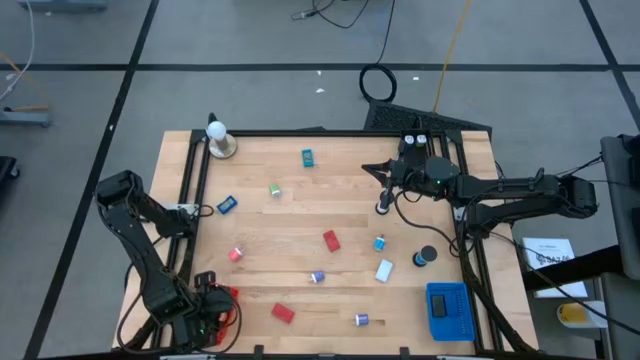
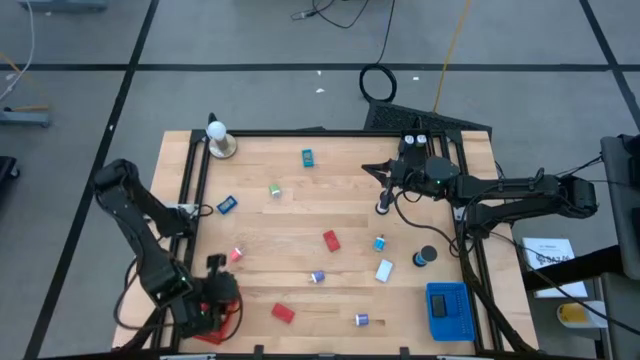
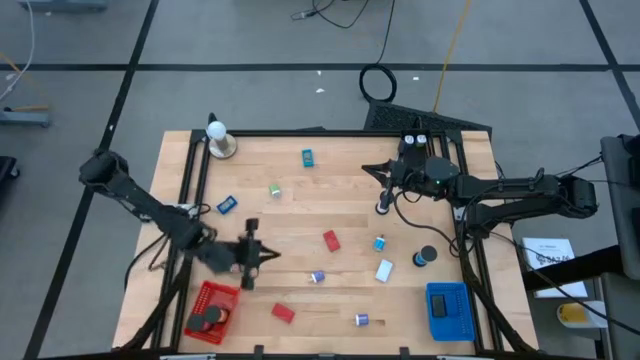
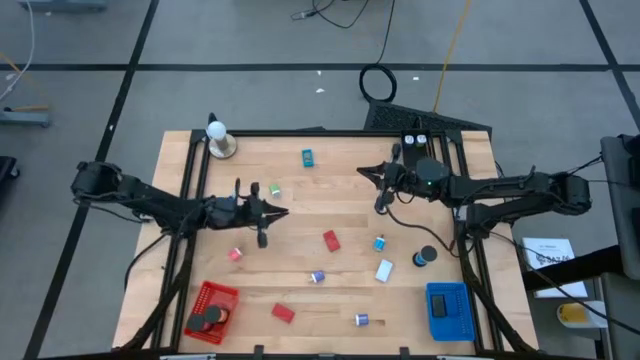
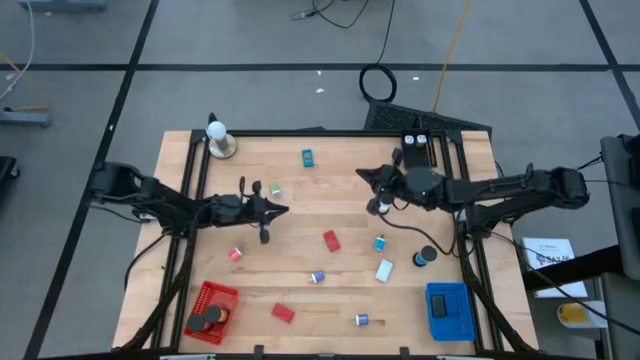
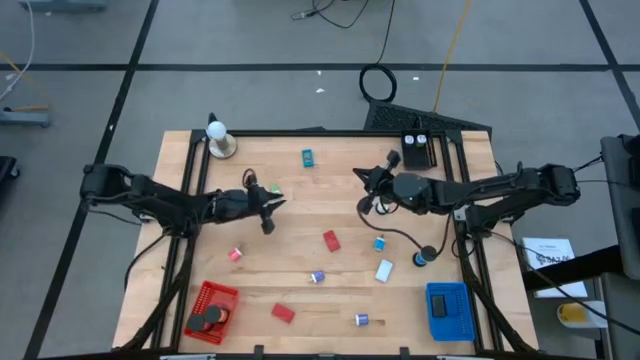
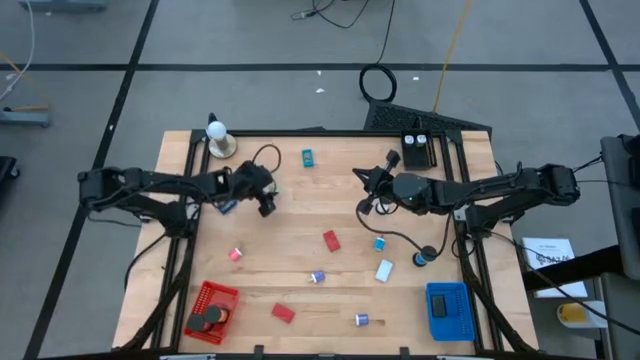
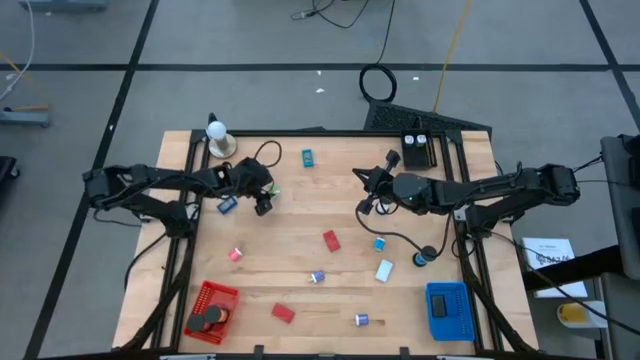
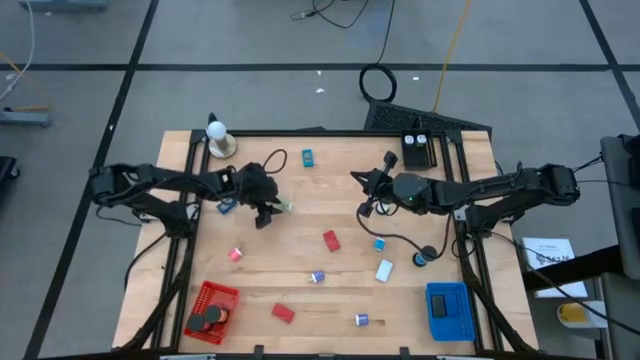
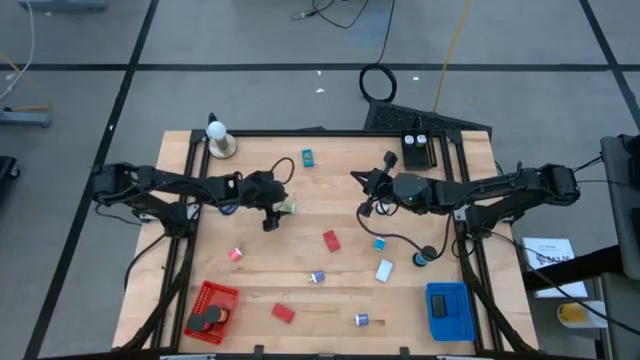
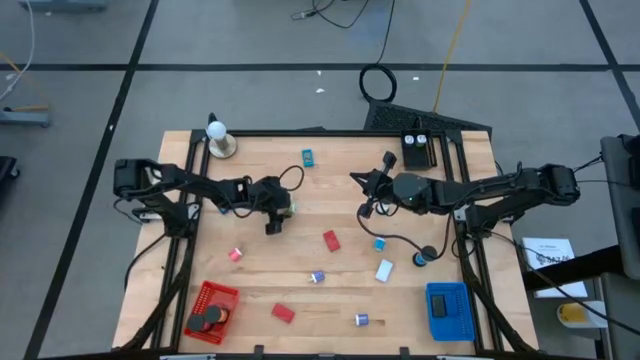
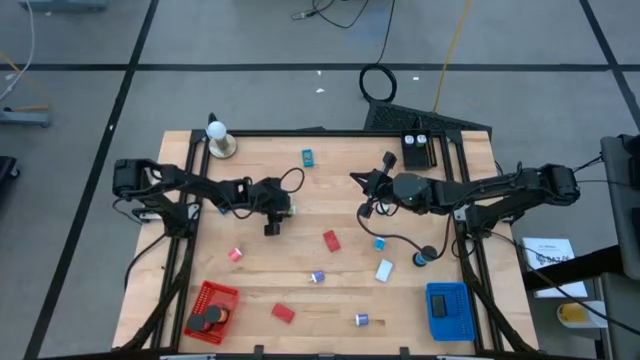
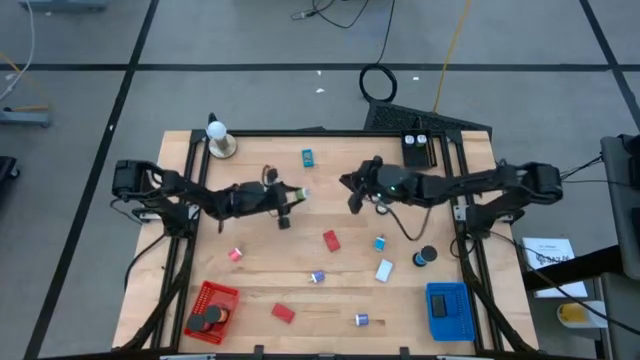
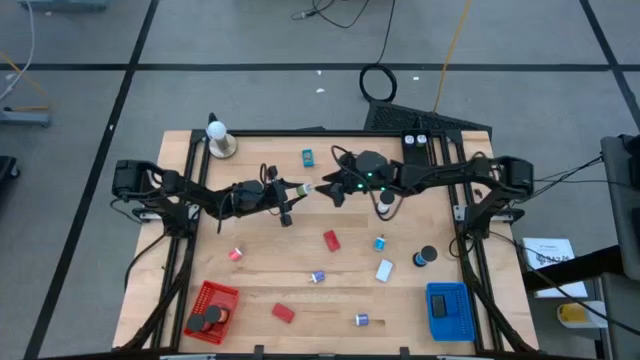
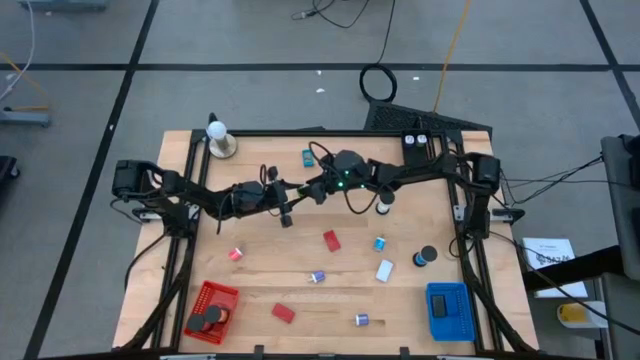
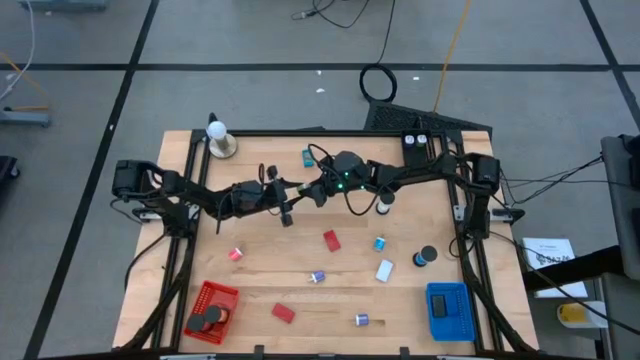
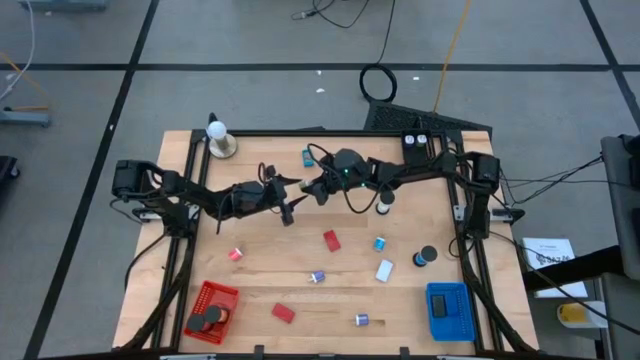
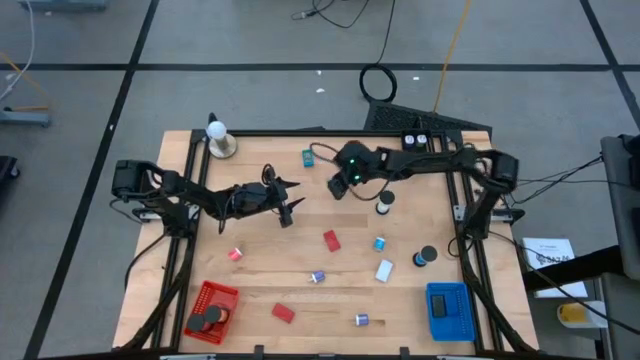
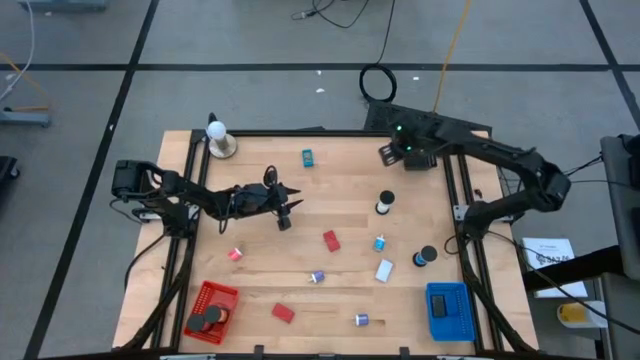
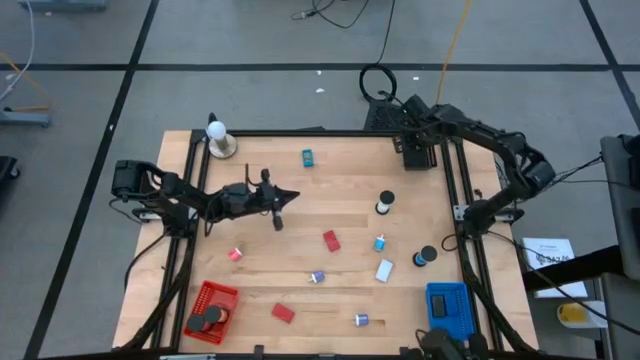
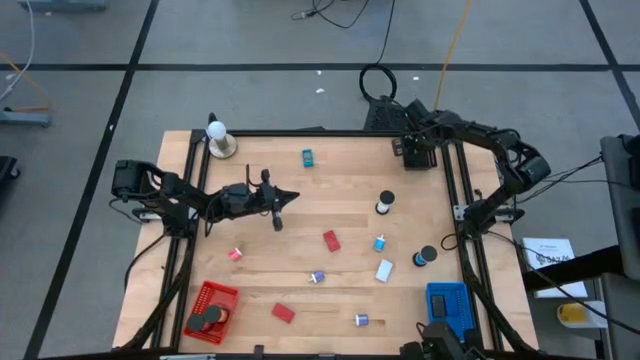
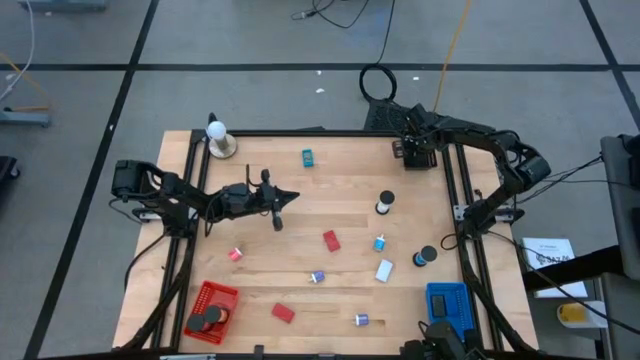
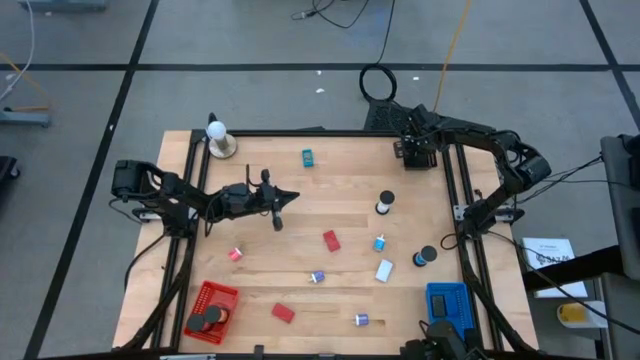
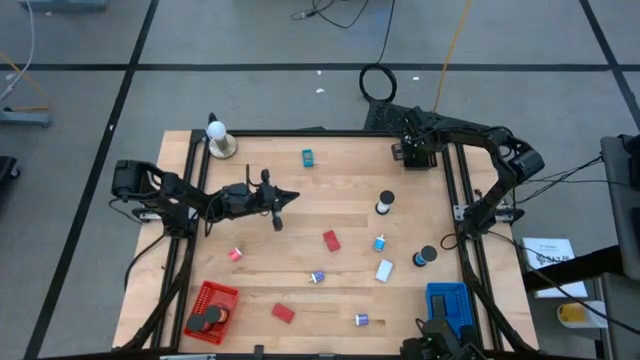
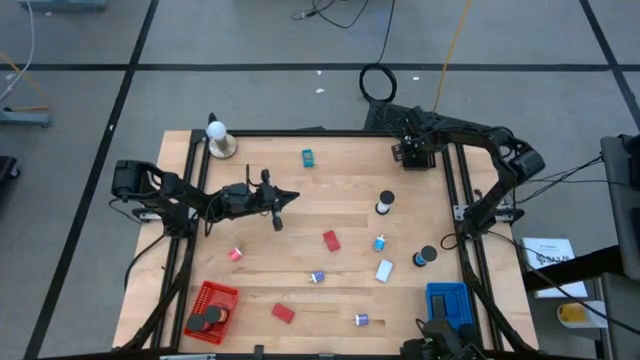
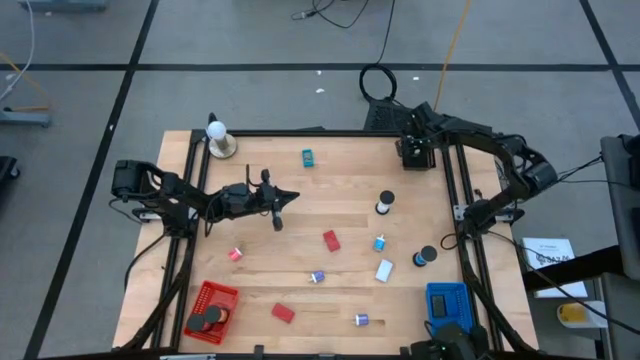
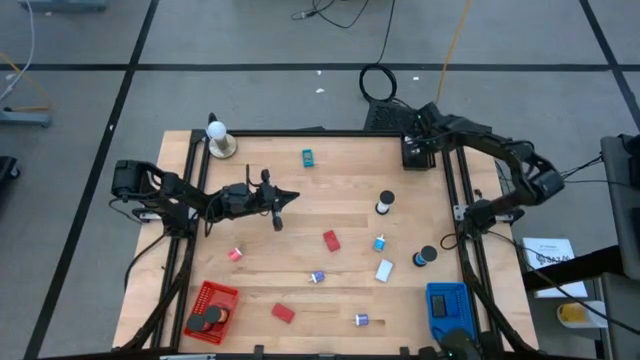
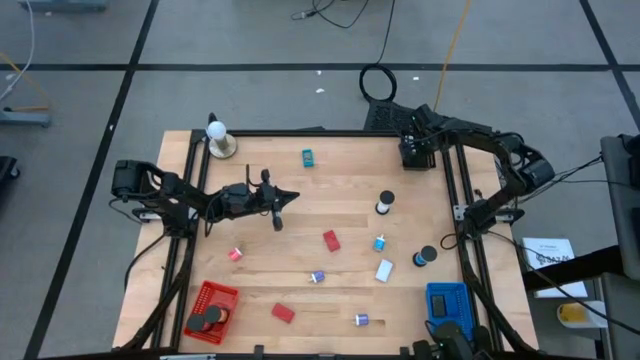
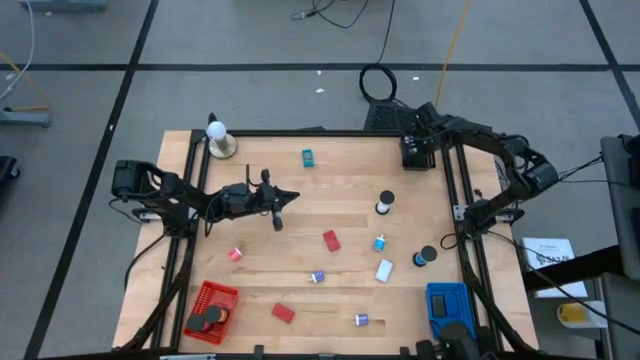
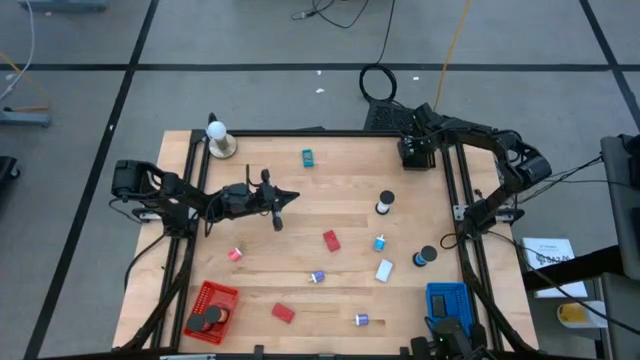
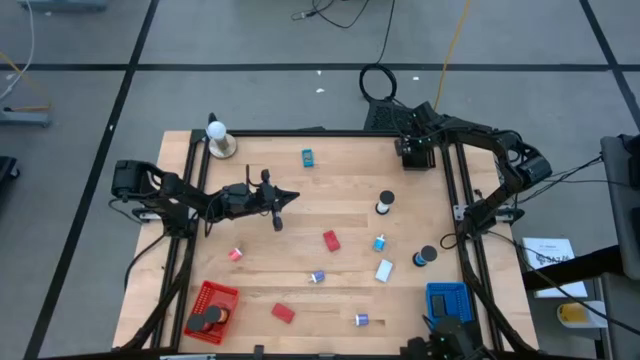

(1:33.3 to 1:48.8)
Task: Pick & Place Office items
Put the green white charger adapter into the black bin

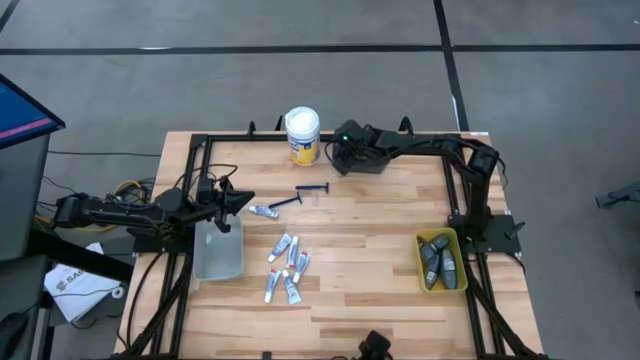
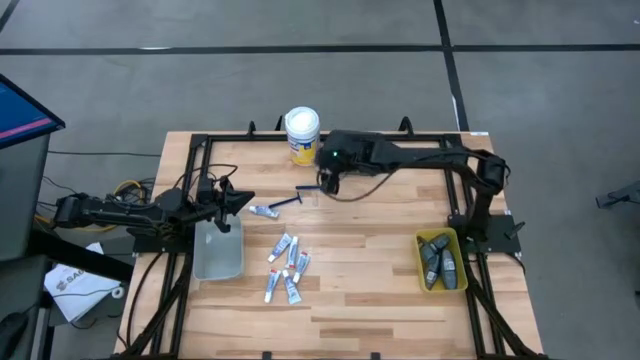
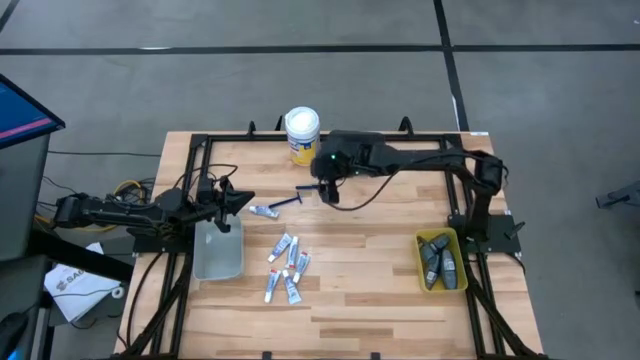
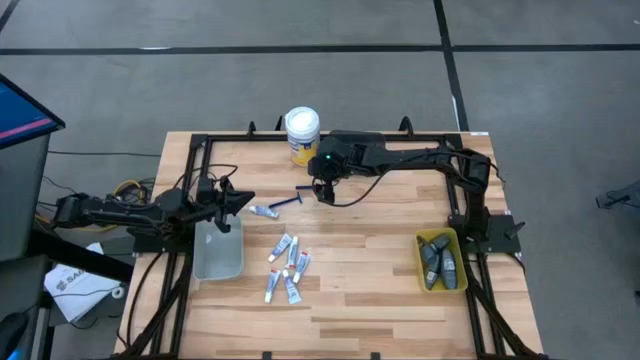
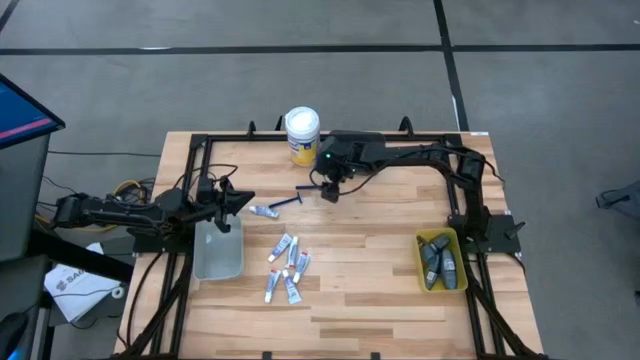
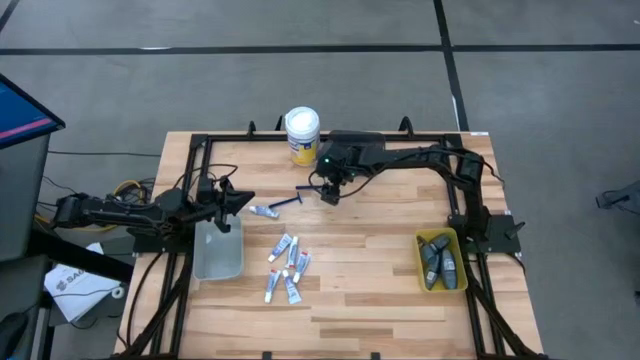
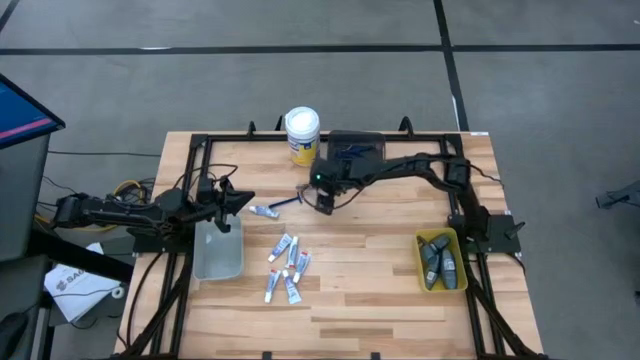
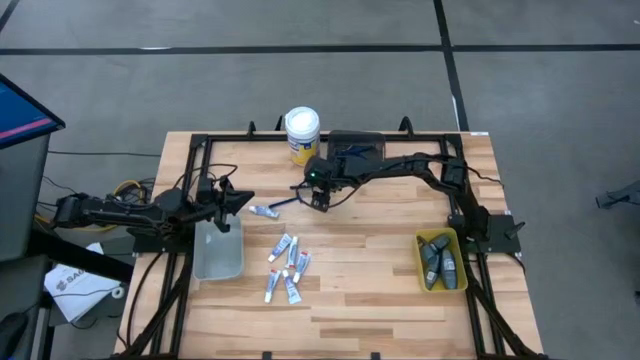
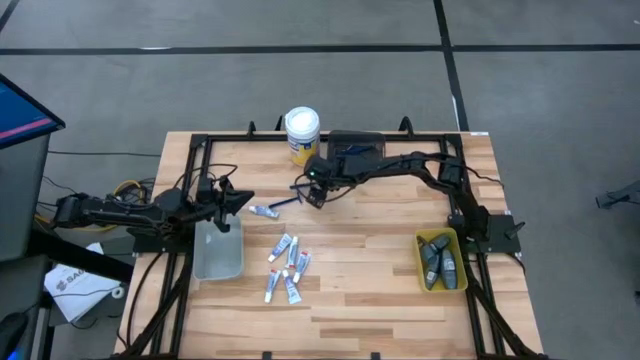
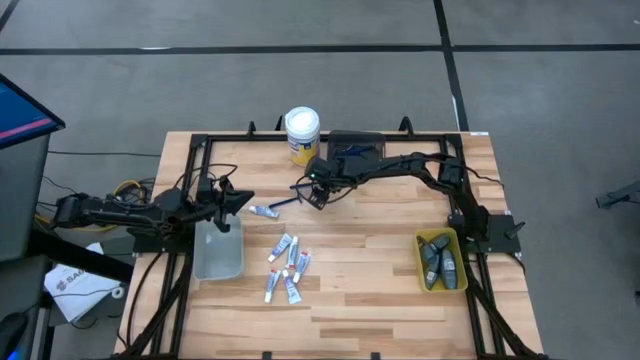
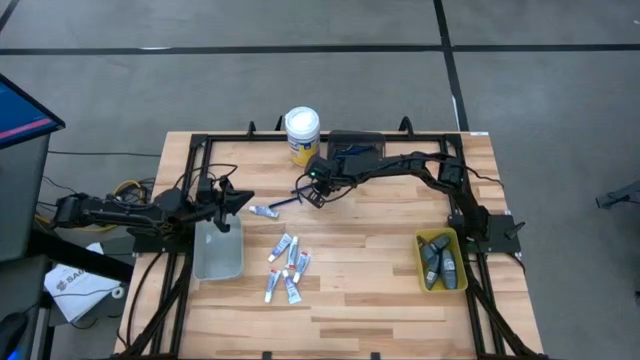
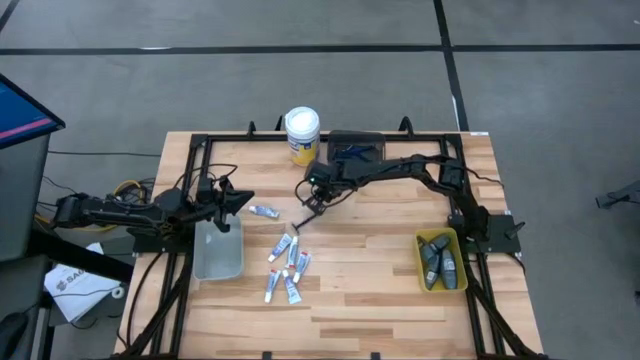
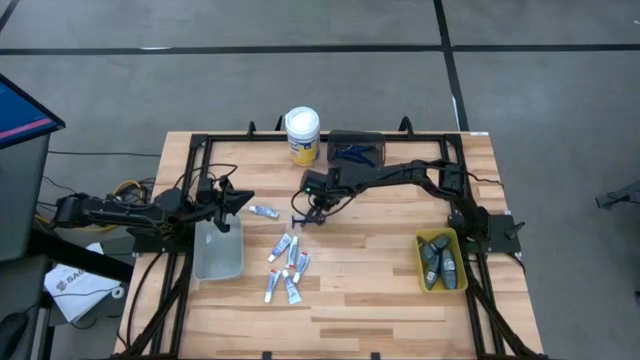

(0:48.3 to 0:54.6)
Task: Pick & Place Travel size toiletries
Put the blue razor into the black bin
